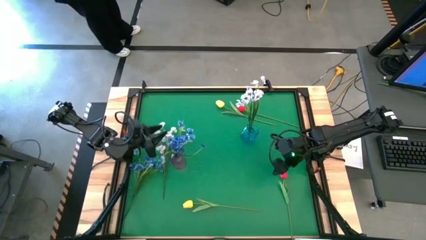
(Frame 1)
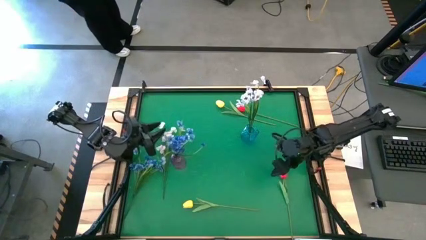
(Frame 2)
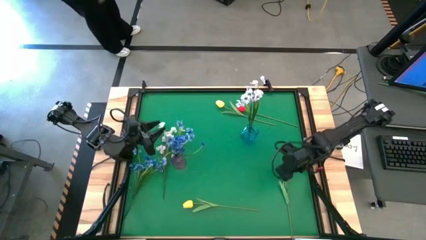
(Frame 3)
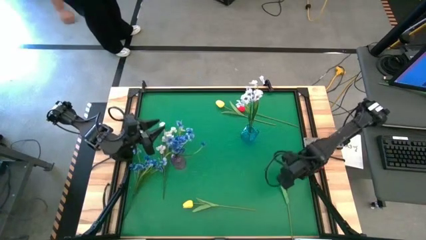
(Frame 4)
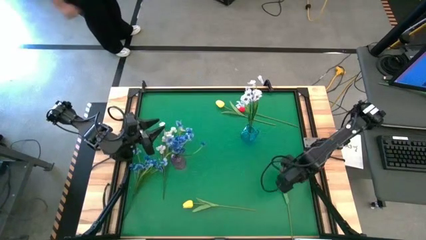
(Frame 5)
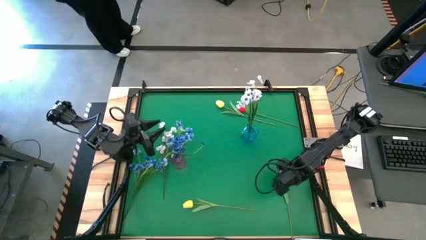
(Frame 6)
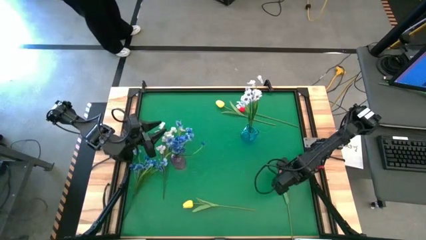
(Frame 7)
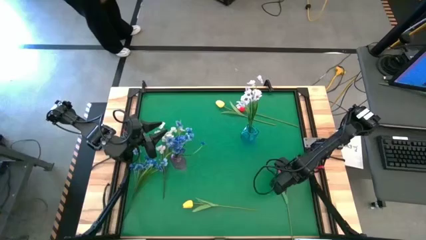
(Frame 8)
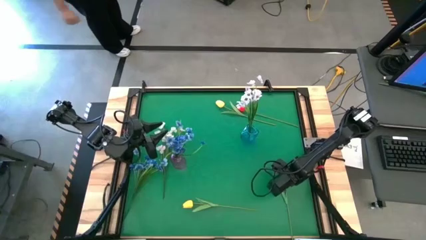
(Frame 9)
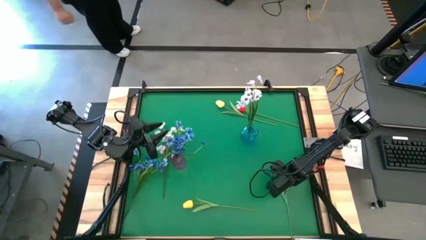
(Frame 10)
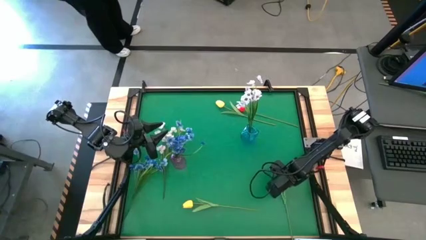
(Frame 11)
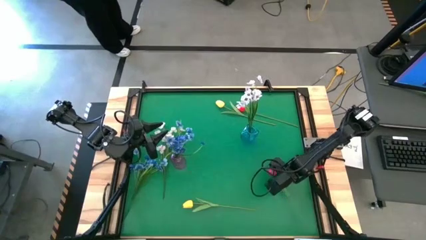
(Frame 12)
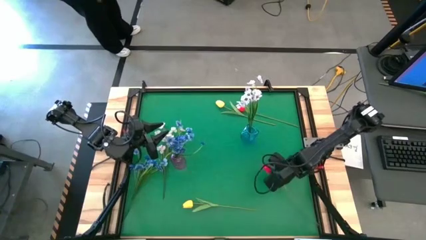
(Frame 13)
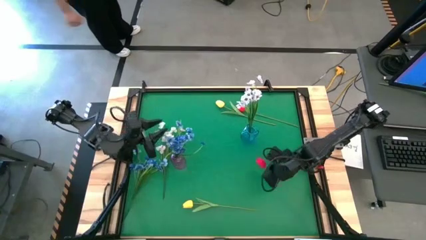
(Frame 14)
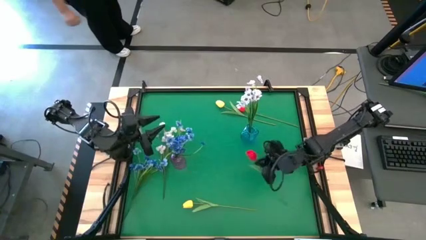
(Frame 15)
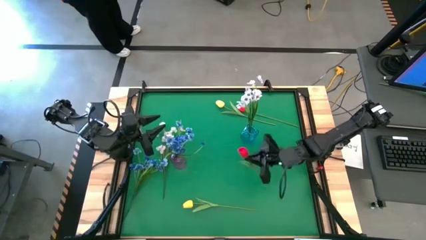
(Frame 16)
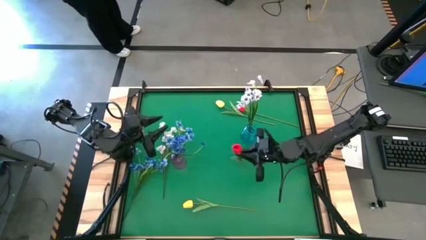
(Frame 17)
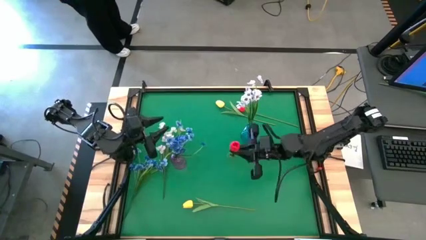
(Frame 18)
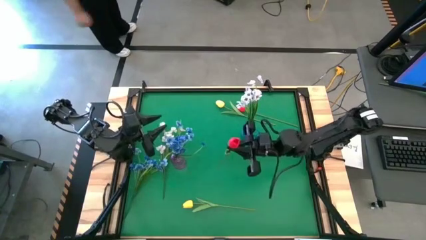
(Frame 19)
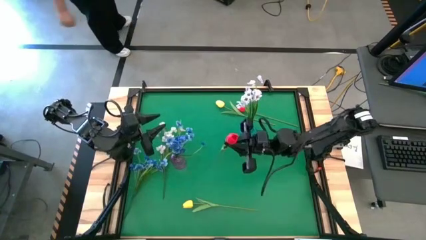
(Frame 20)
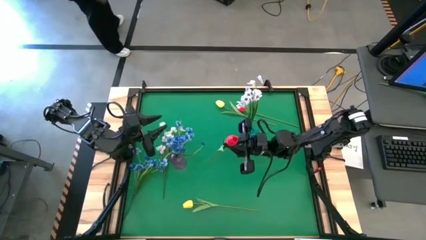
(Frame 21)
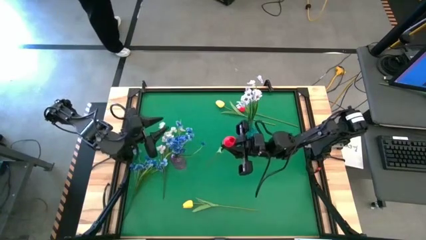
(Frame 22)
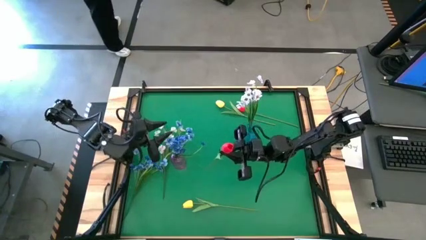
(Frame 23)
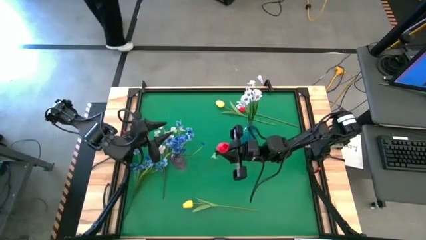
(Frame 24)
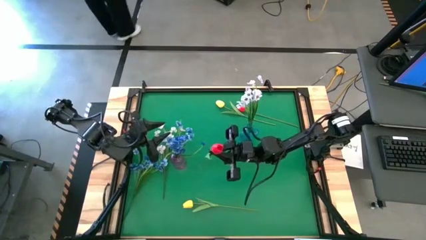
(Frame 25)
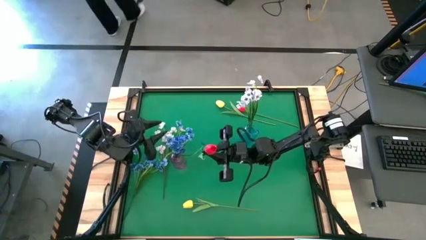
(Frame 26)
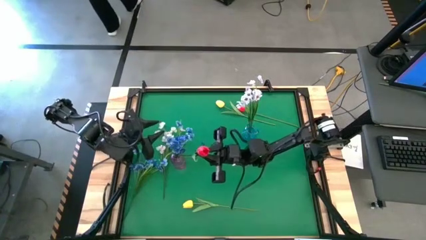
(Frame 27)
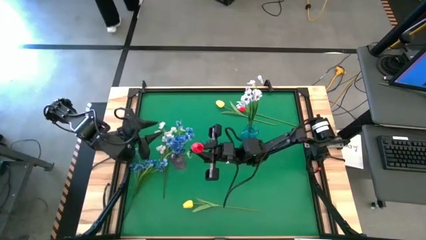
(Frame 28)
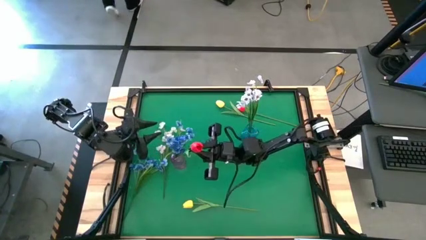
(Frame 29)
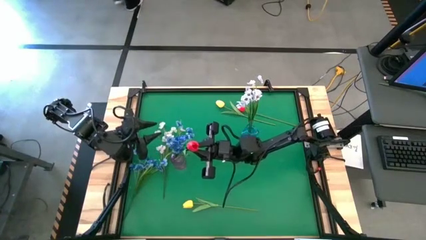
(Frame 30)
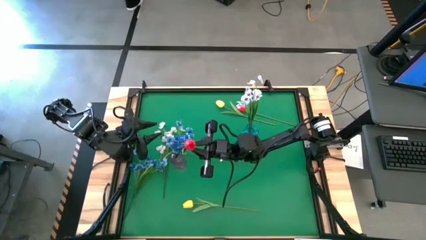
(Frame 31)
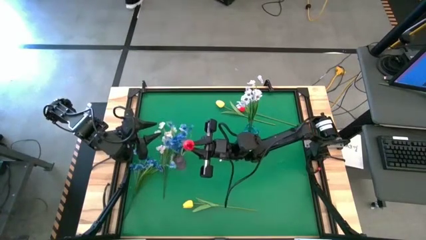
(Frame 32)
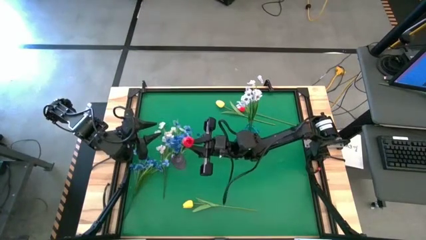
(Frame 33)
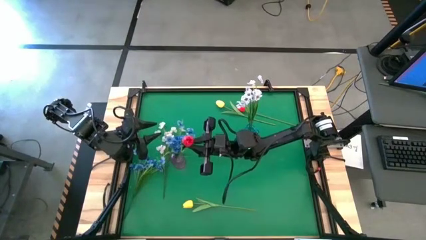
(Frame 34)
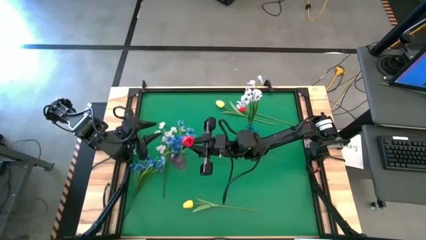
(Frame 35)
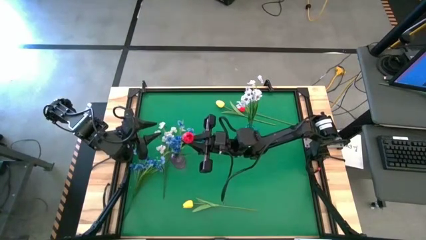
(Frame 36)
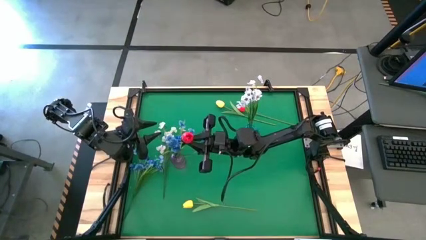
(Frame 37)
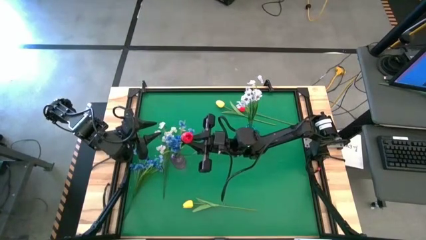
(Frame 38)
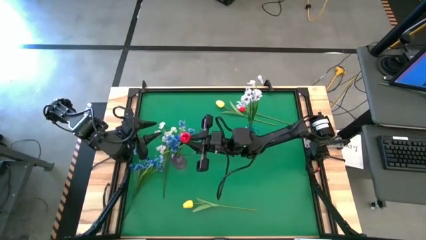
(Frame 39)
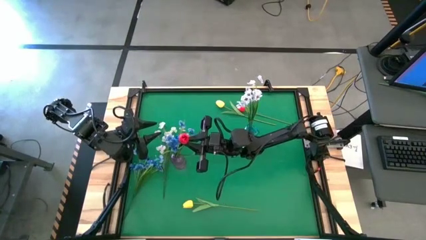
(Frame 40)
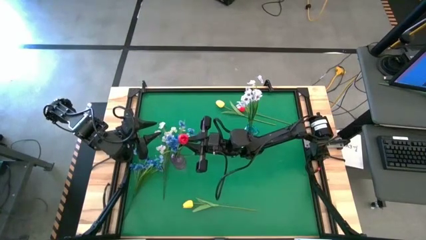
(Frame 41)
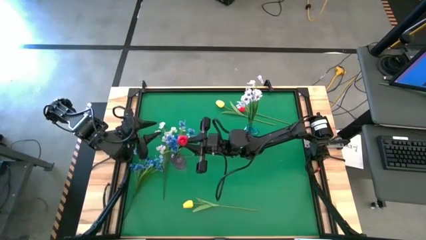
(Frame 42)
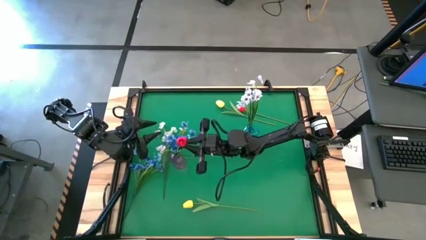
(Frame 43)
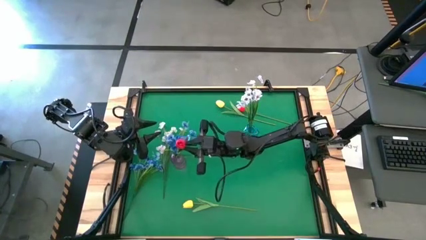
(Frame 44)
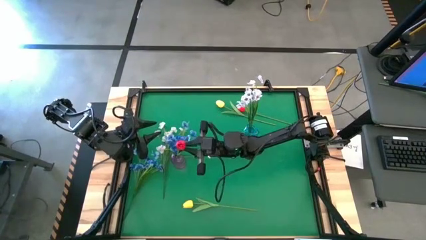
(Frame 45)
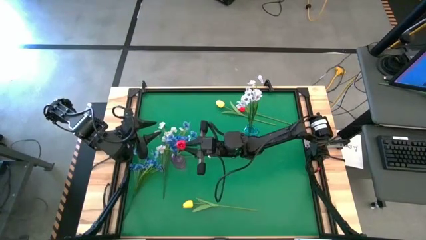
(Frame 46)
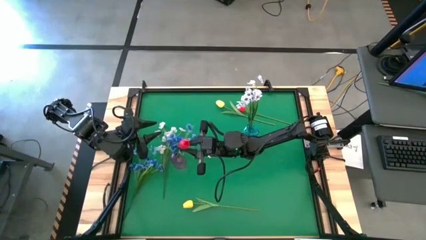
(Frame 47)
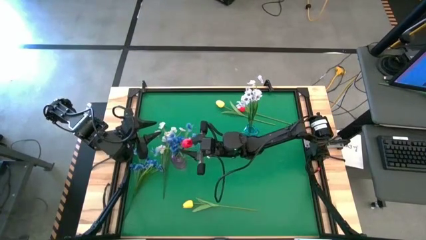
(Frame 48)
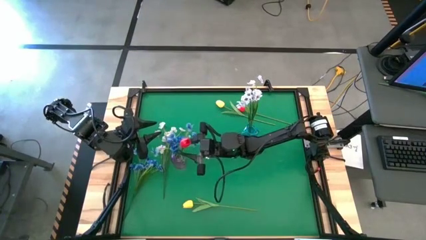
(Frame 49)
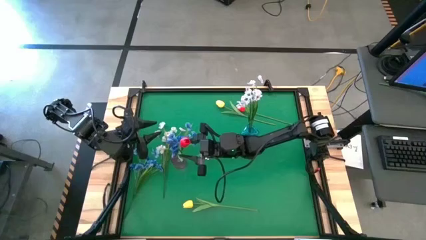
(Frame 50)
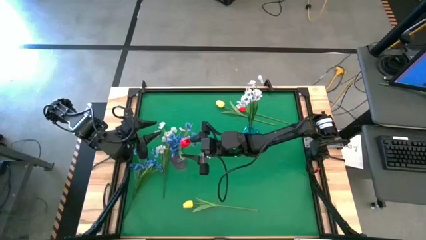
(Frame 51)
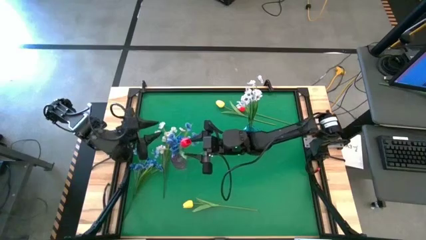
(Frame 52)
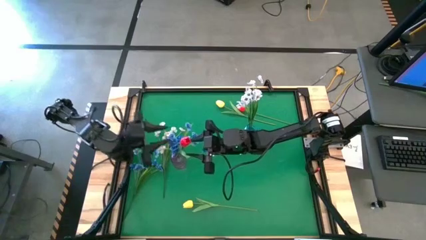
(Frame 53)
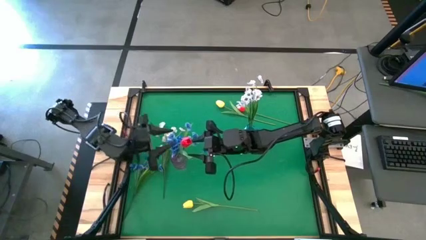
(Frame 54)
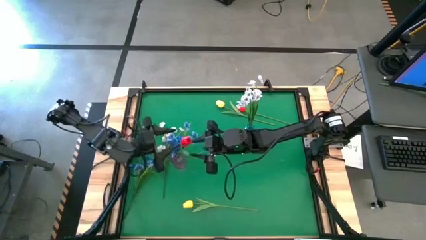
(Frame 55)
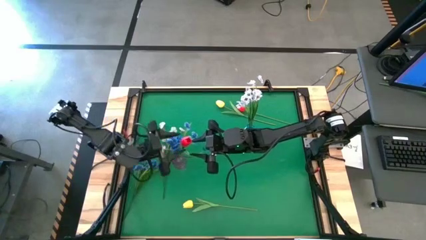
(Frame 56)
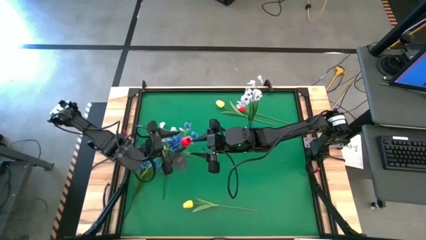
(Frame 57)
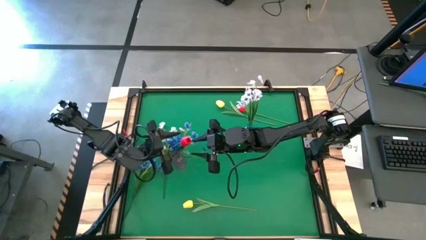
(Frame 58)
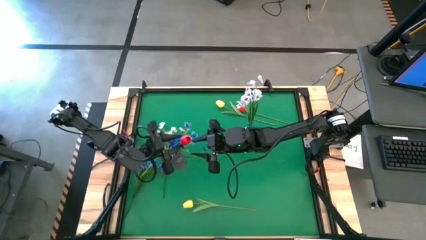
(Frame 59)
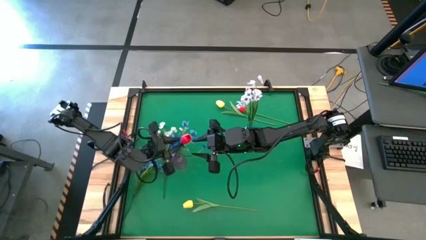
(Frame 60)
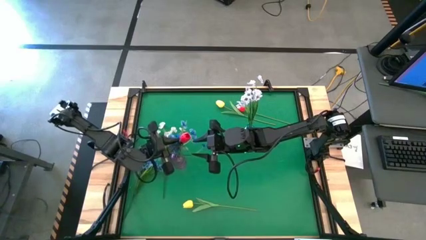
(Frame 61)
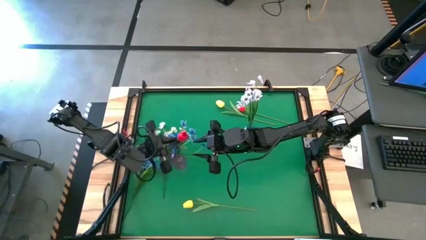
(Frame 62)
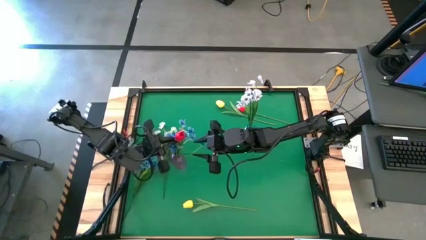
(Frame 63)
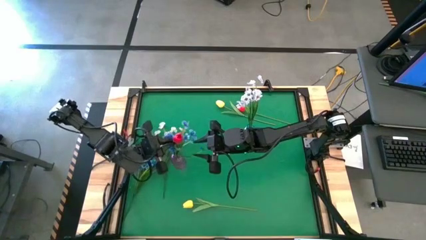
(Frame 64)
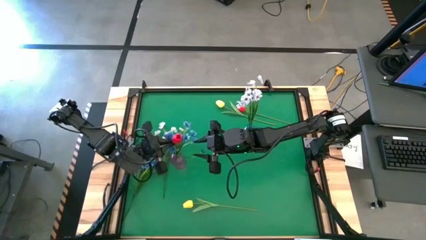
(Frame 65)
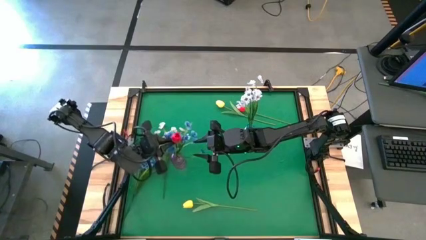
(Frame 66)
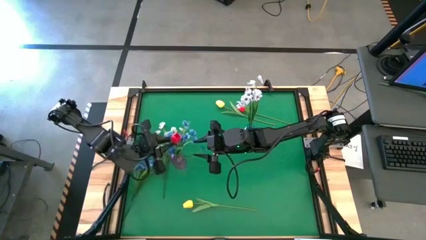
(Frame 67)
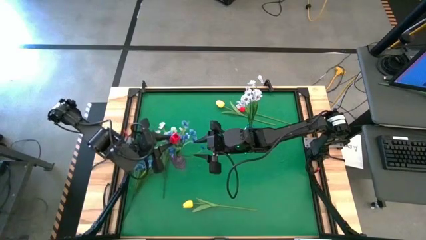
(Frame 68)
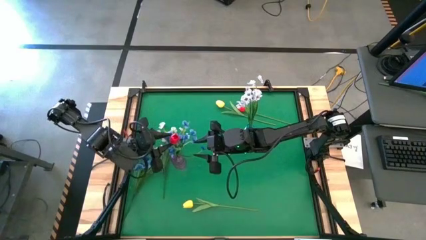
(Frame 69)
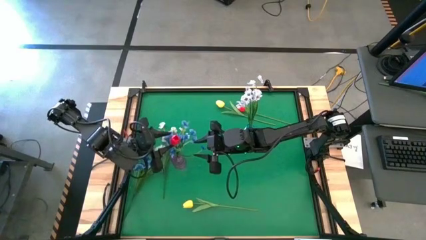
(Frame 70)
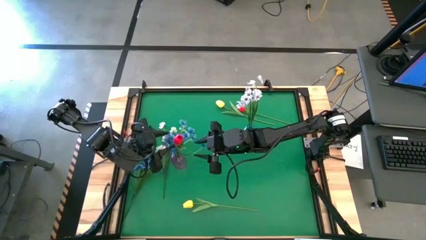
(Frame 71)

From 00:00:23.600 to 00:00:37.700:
Task: Sort flowers into vase by color
Put the bottom red tulip into the violet vase
